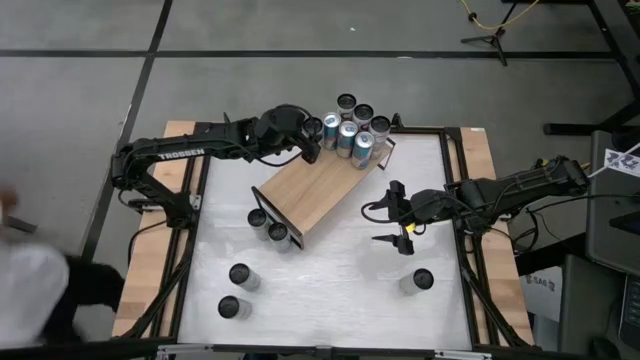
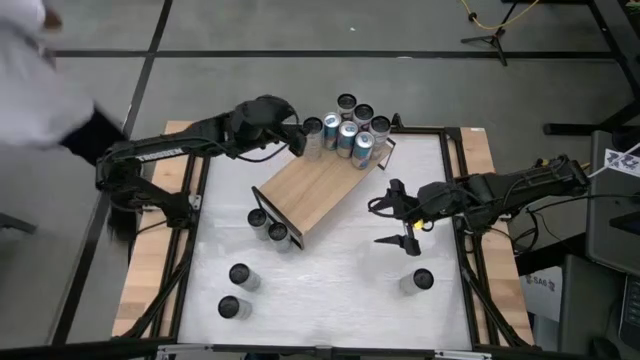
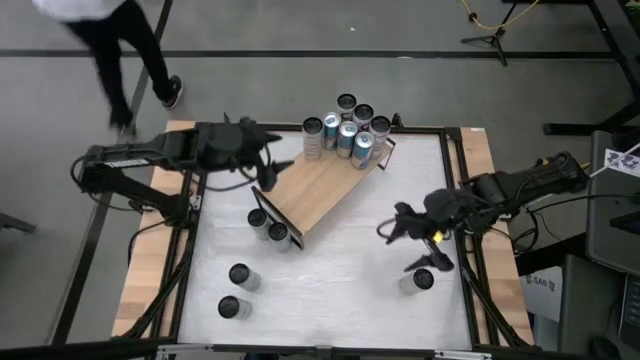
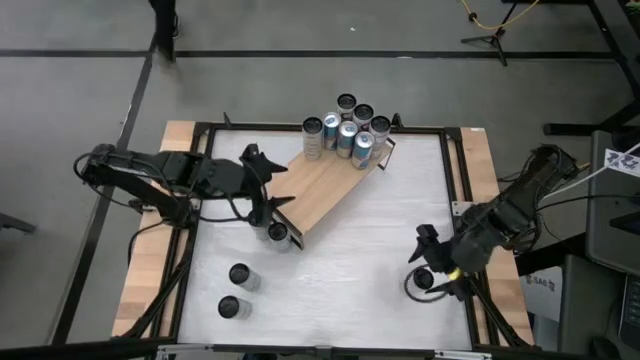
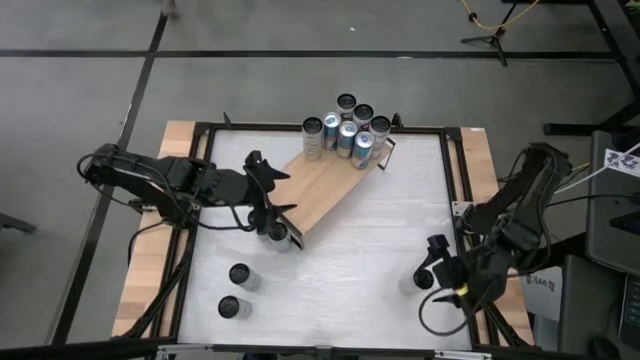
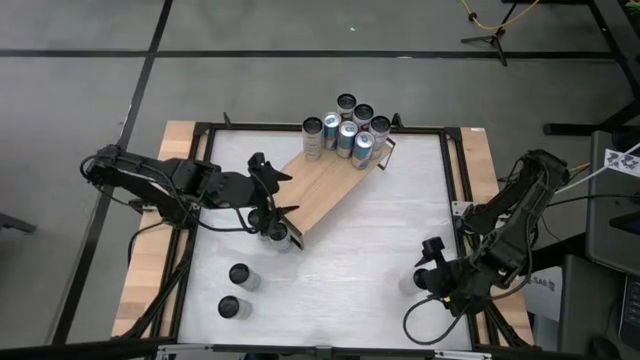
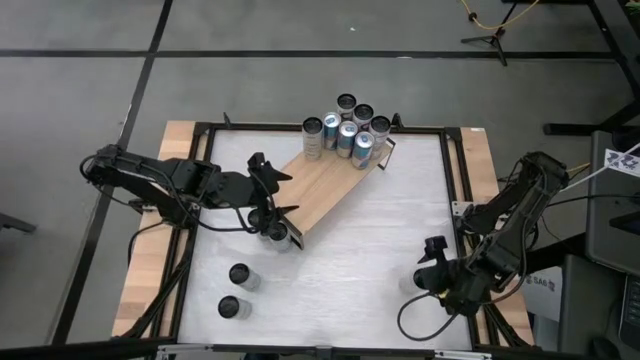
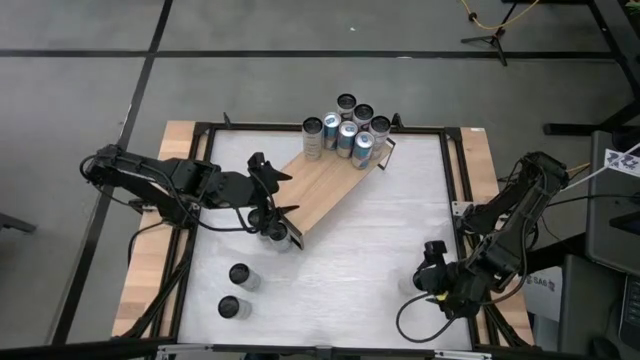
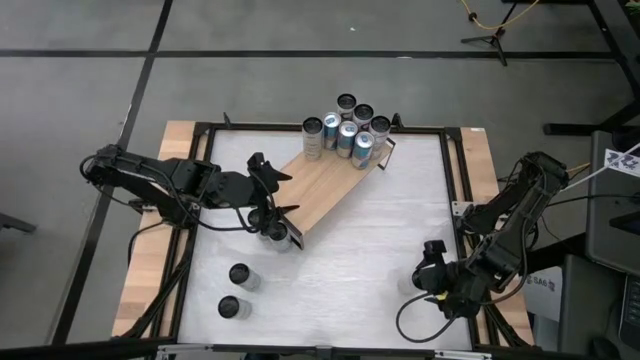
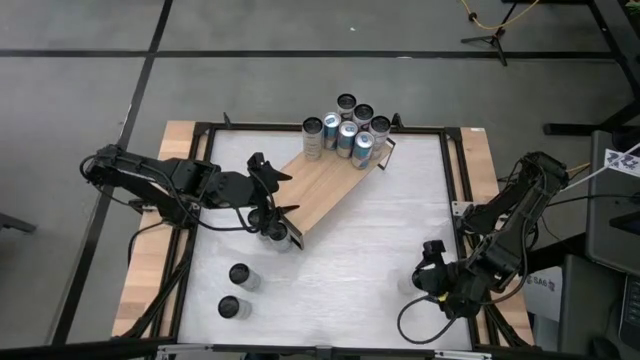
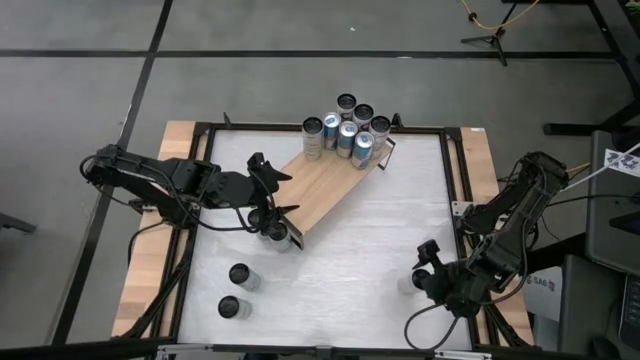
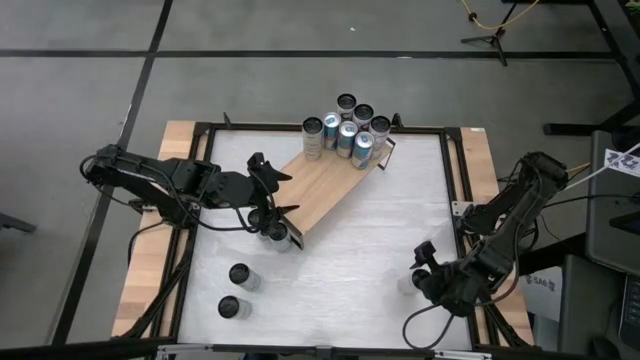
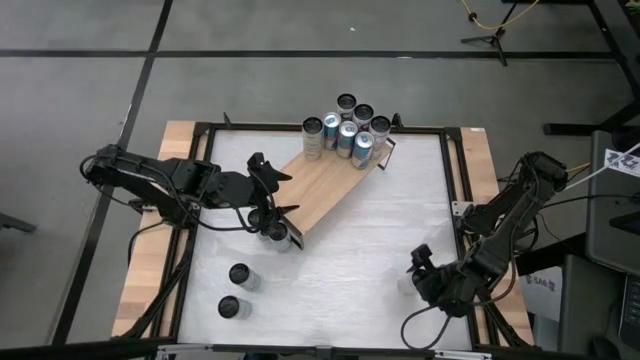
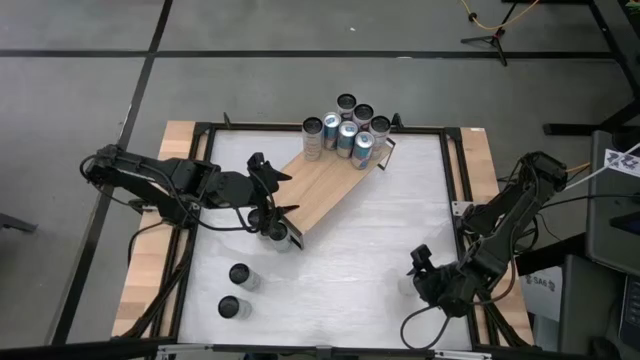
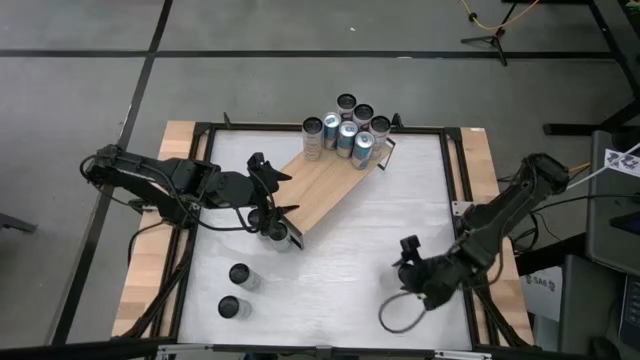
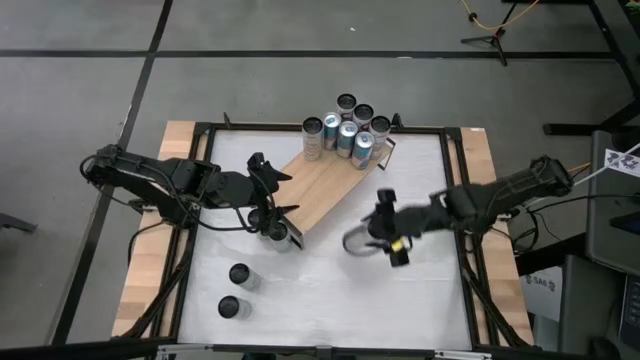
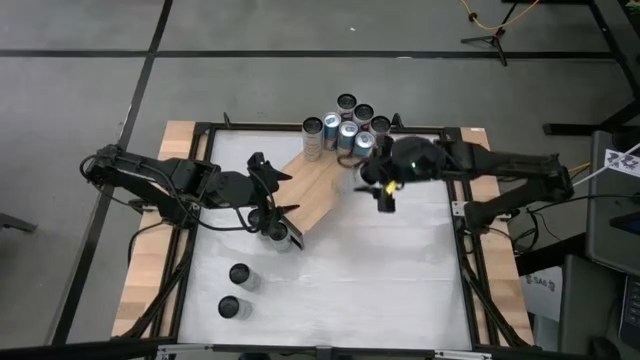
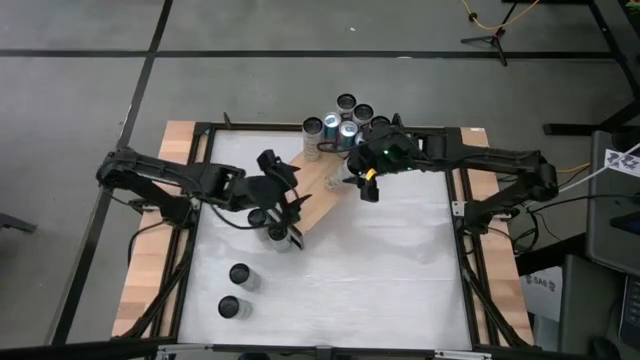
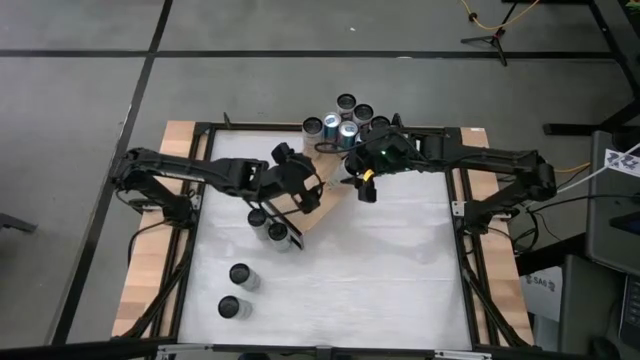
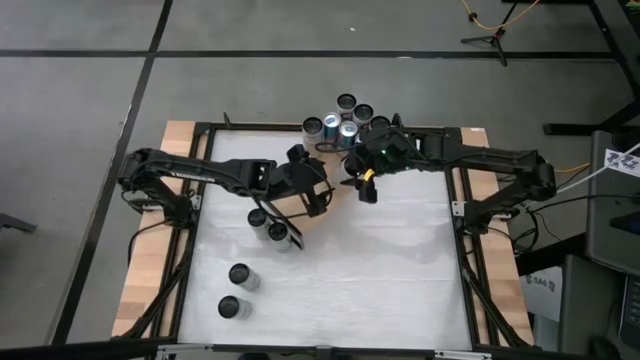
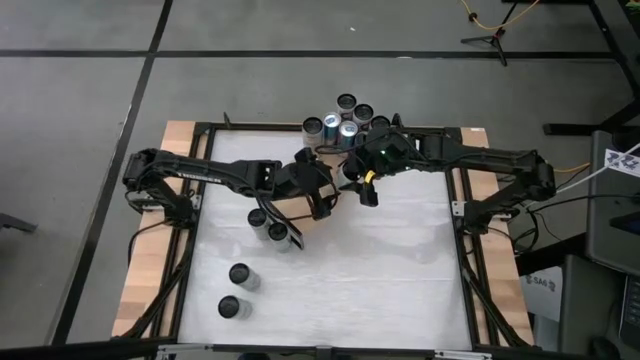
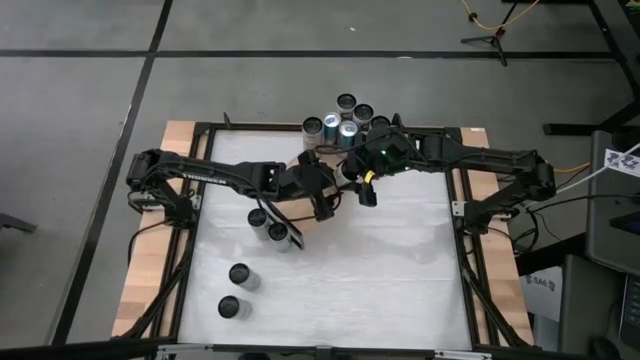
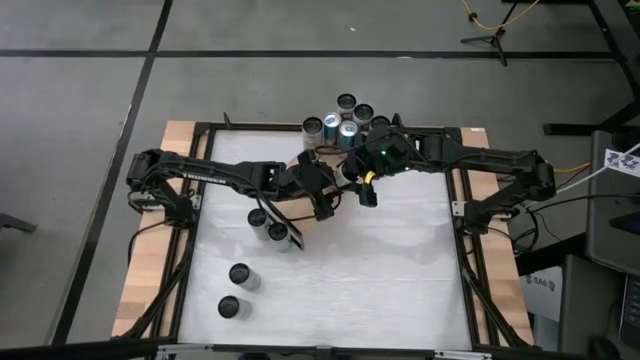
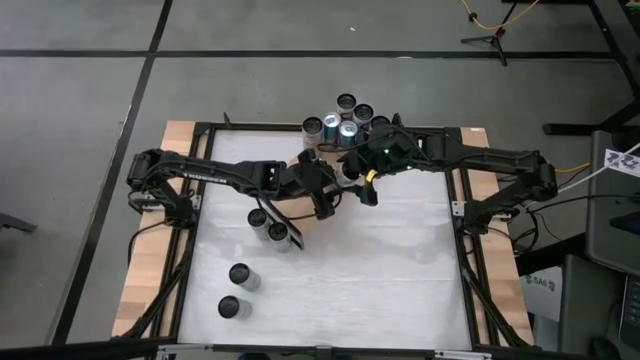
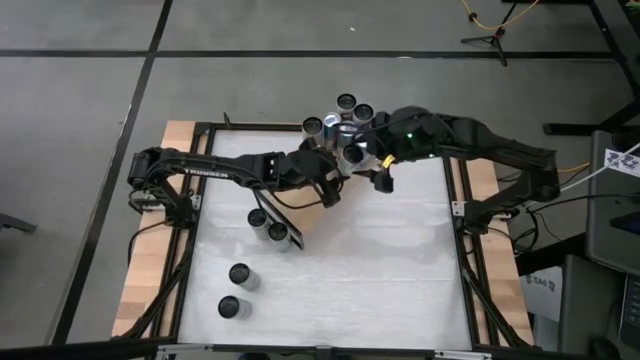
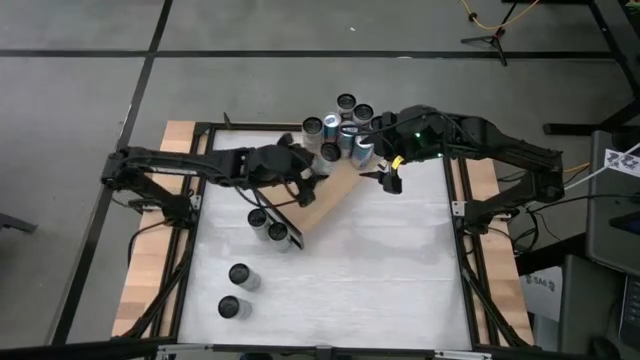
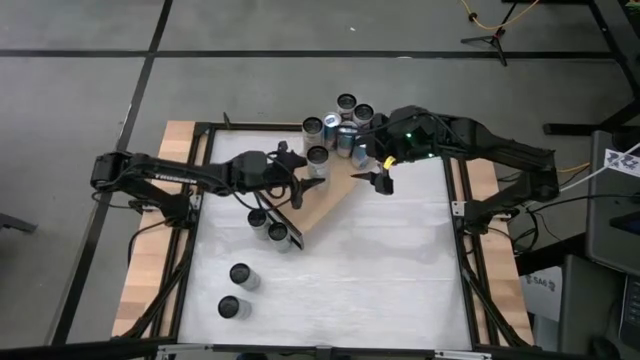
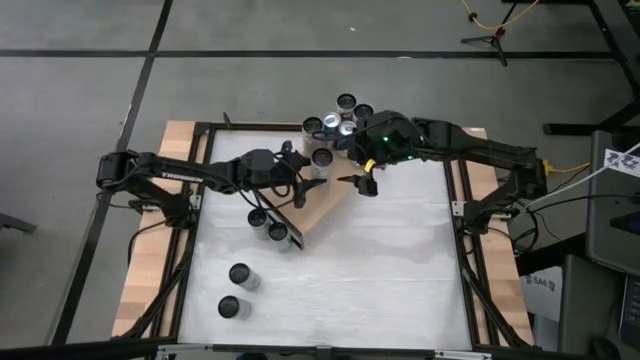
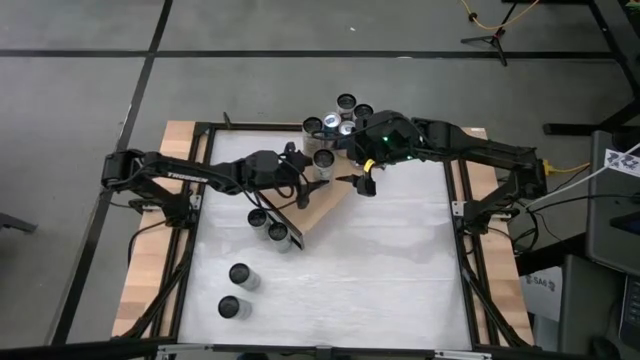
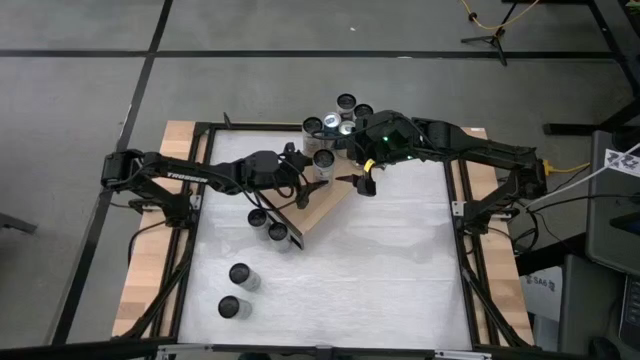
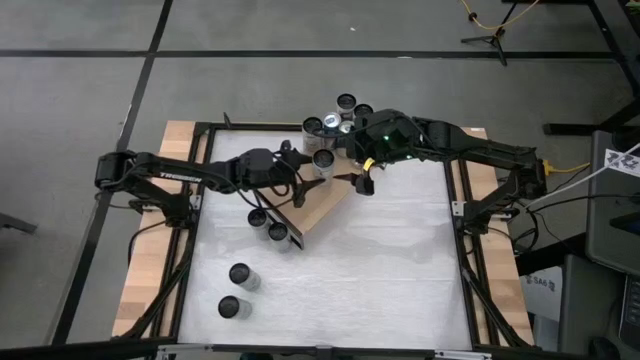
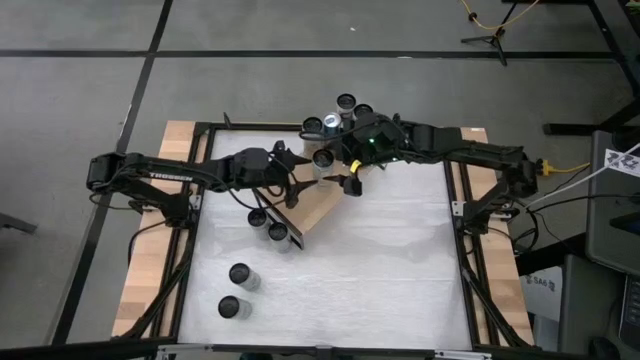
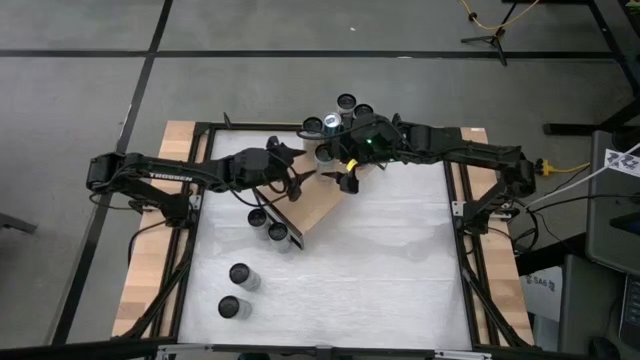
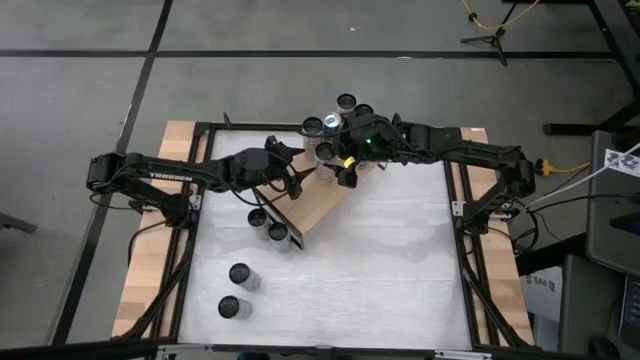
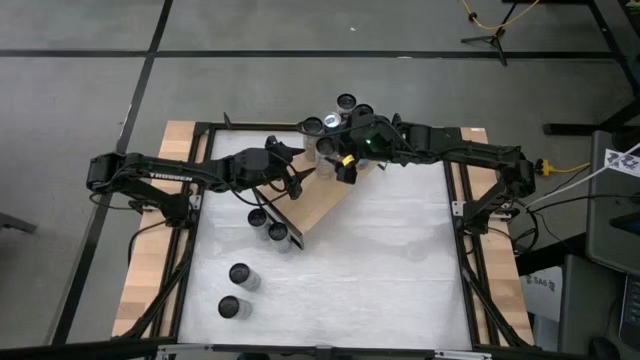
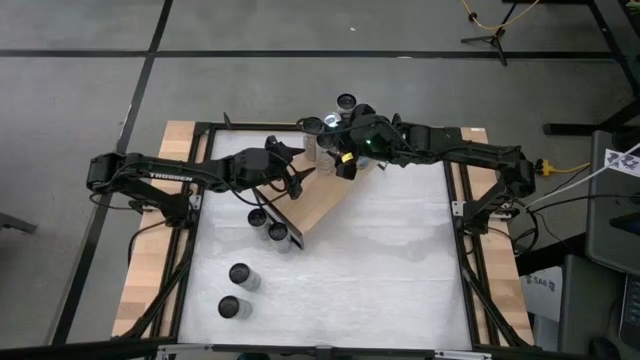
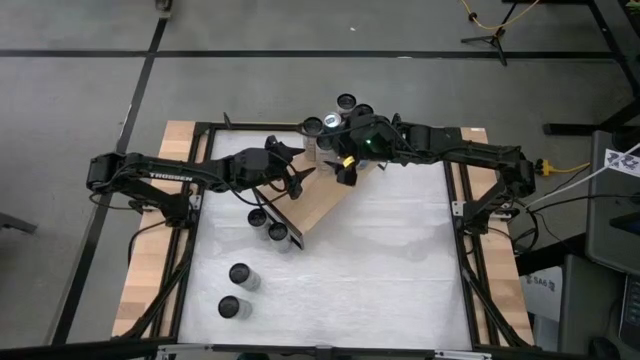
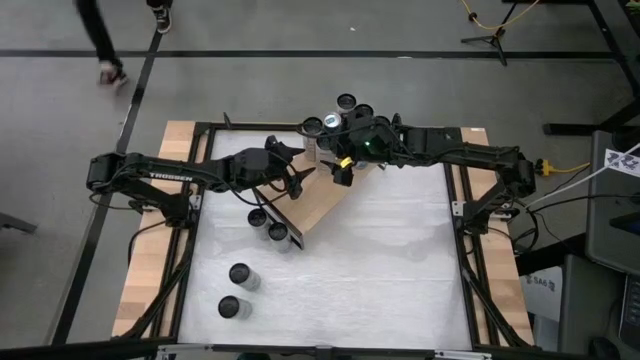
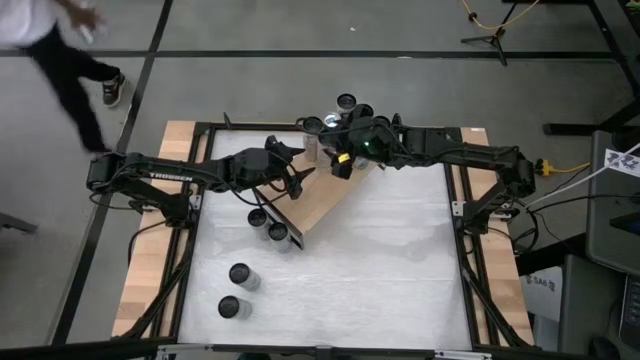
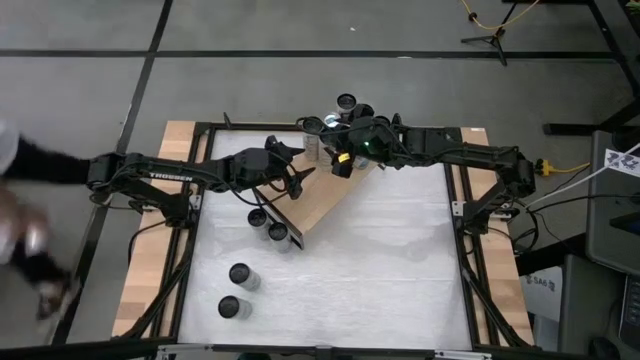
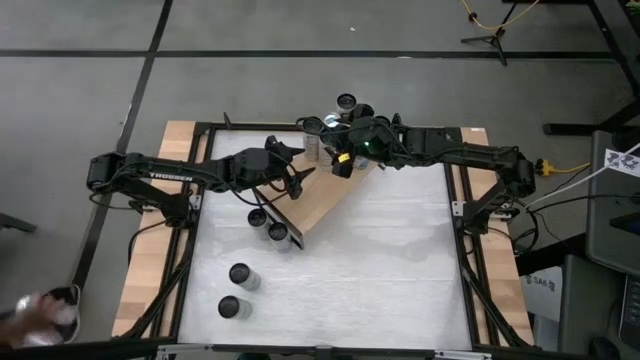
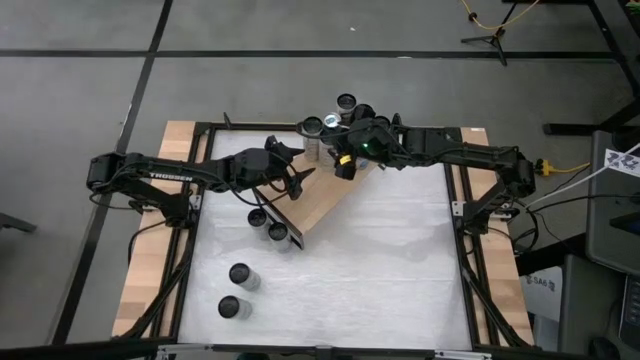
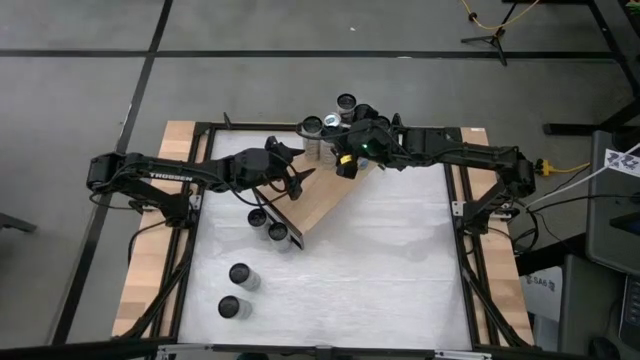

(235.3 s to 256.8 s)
Task: Place canned beverage on shelf
Put the white-yellow soda can on the shelf aligned with the other white-yellow soda can
